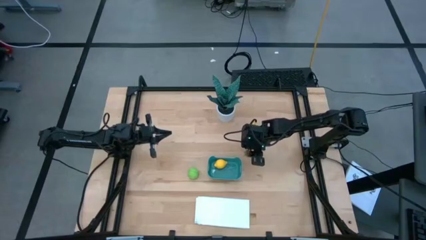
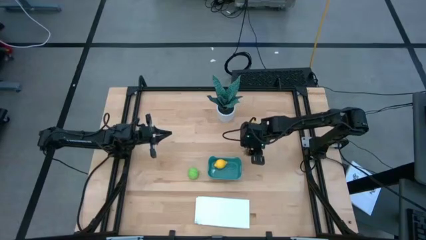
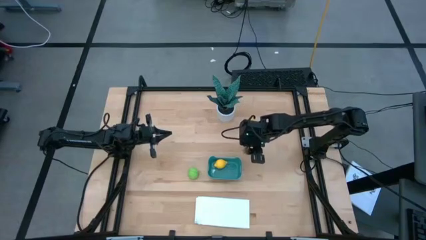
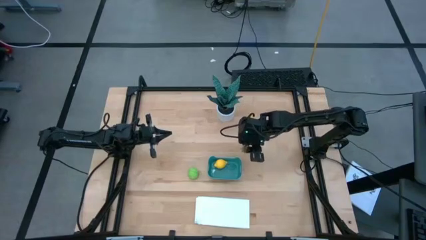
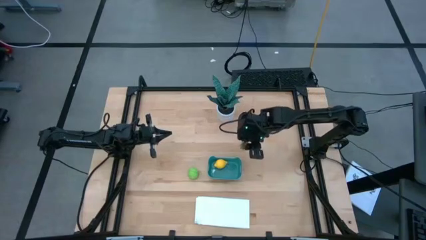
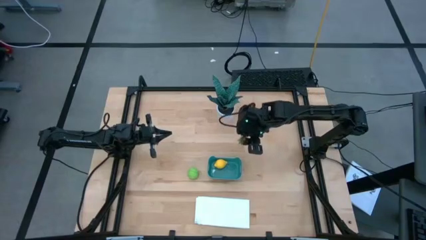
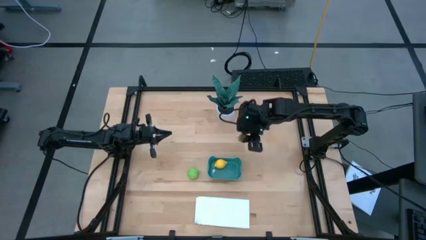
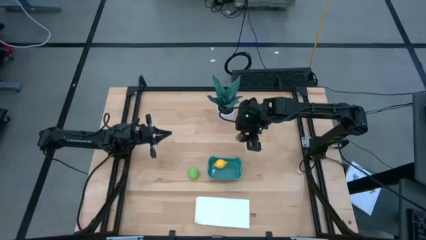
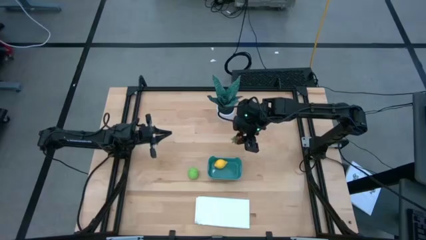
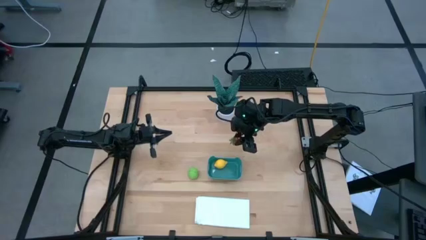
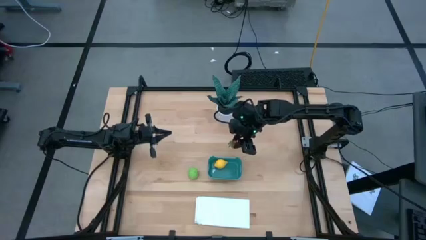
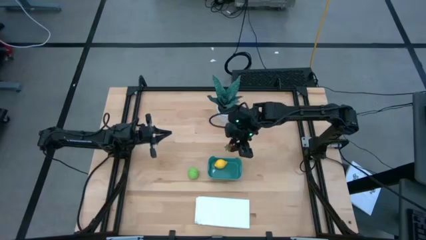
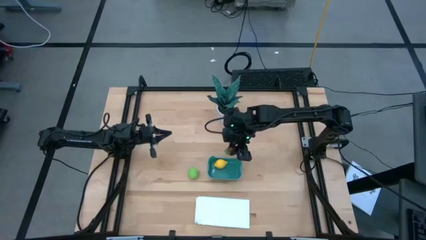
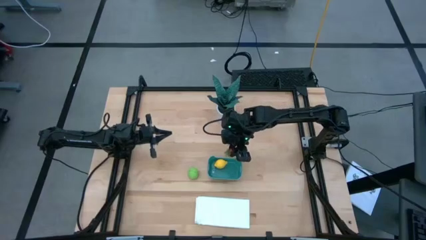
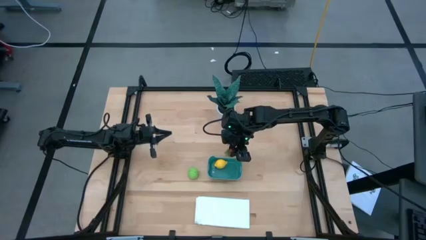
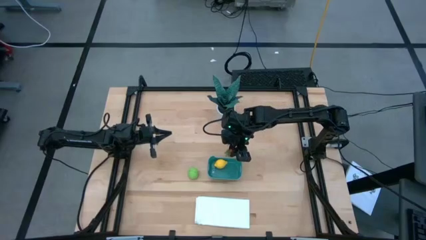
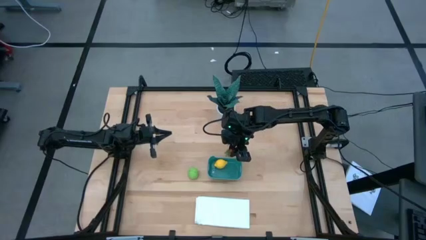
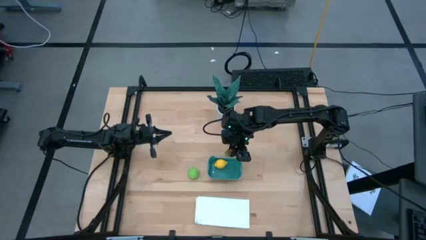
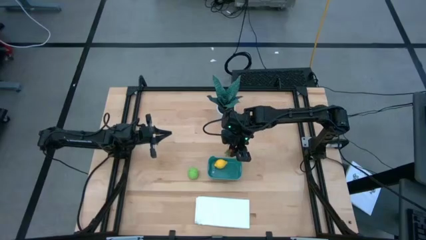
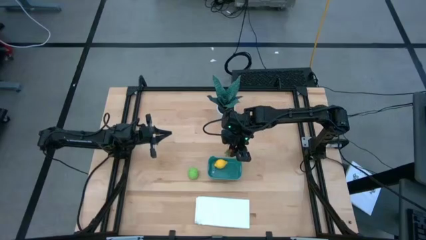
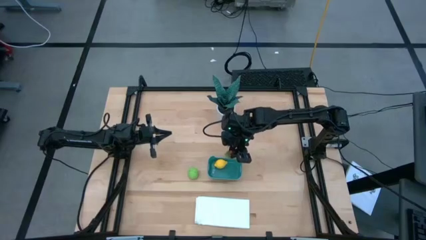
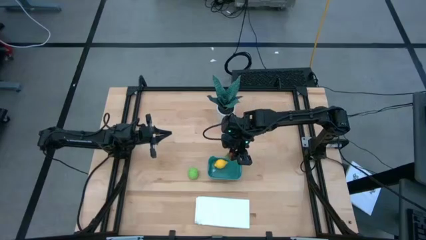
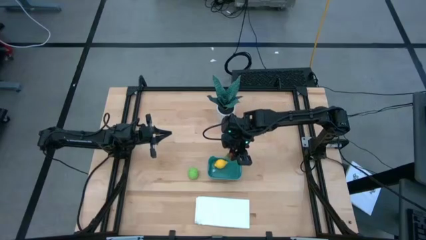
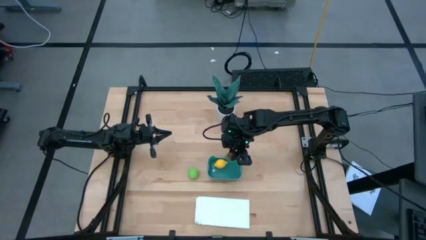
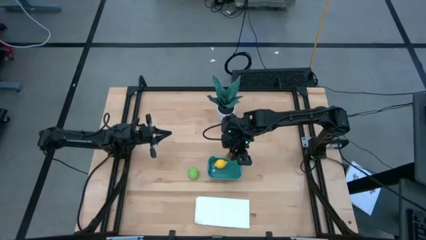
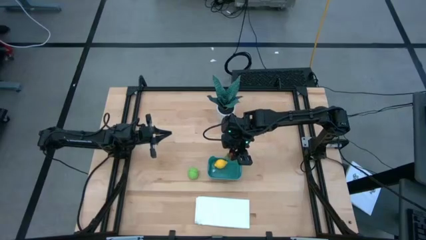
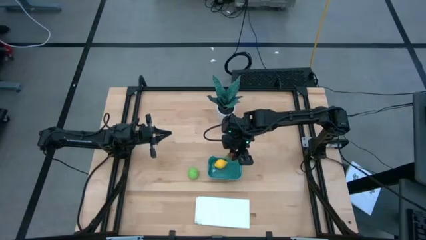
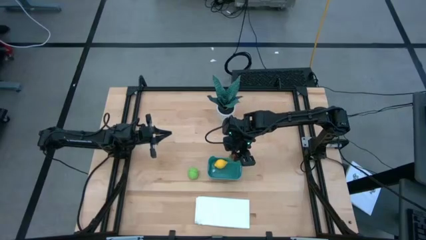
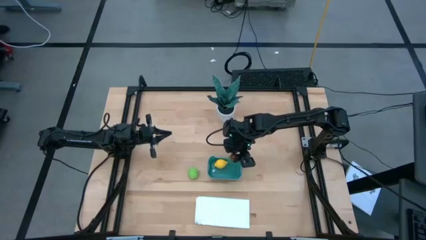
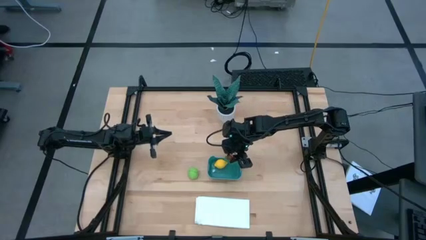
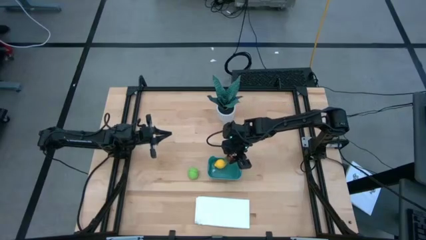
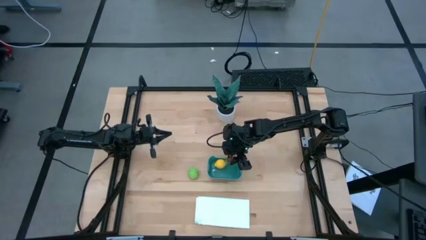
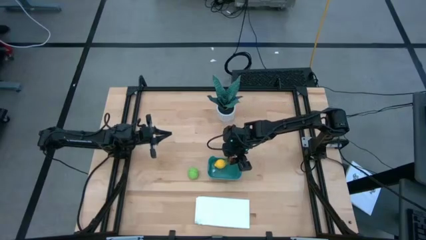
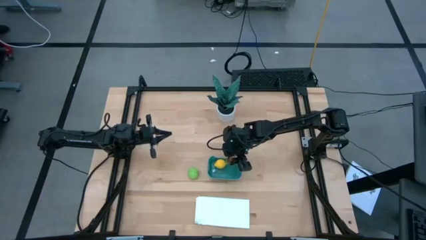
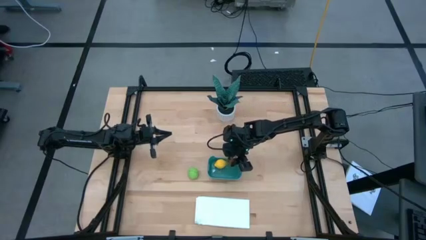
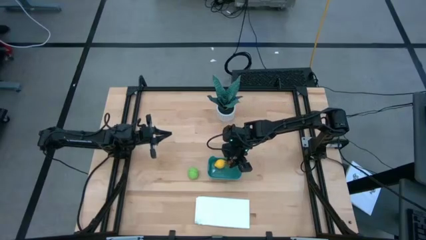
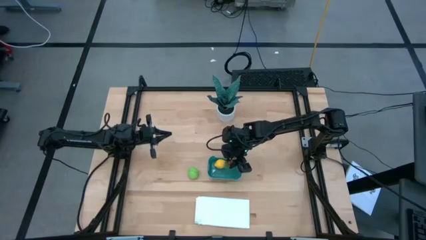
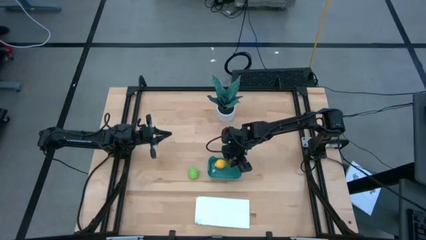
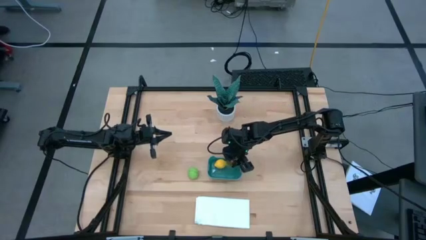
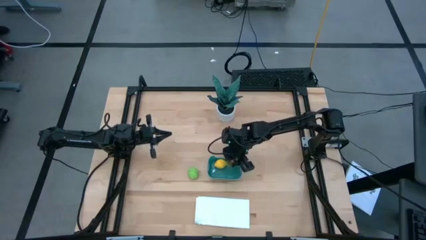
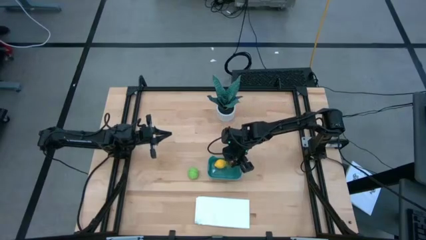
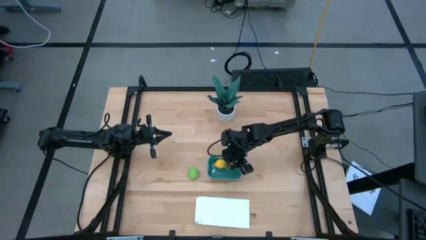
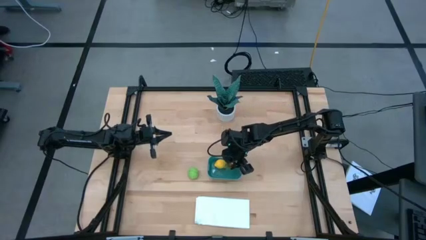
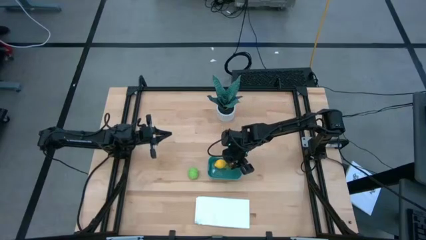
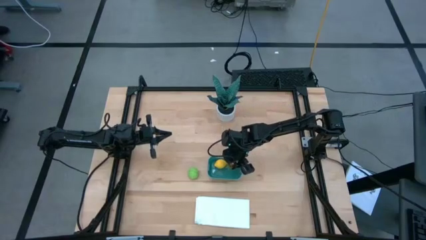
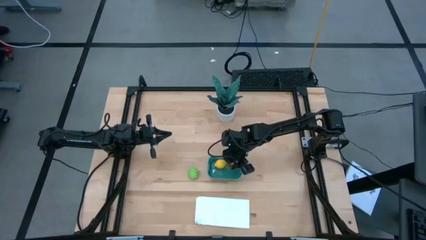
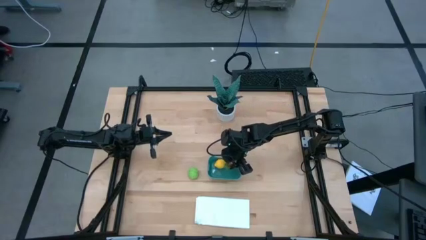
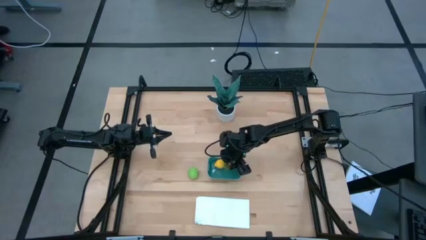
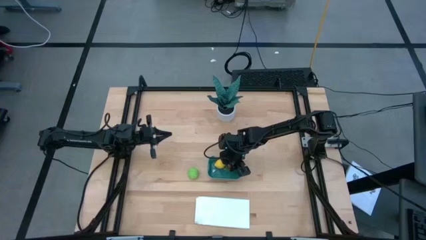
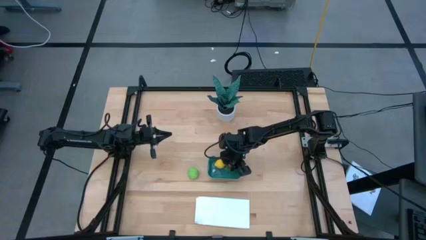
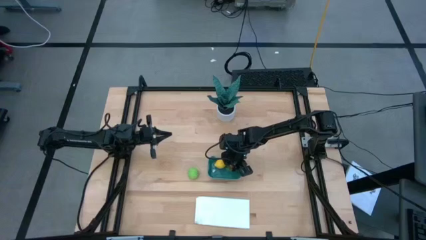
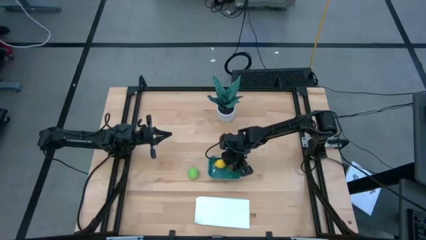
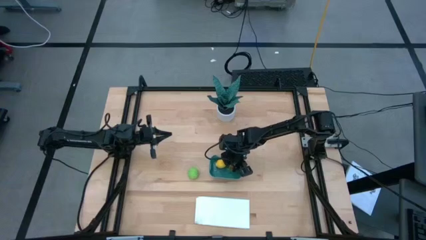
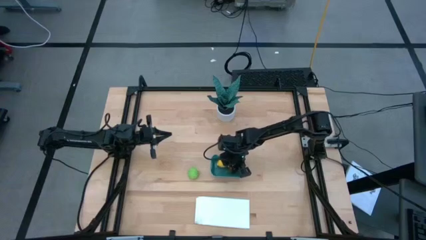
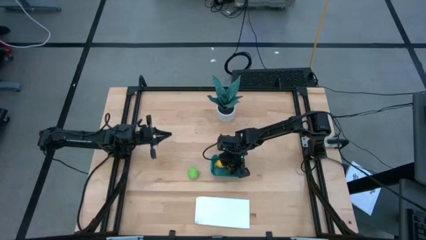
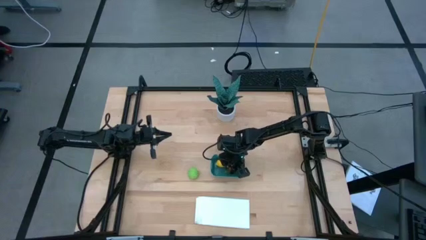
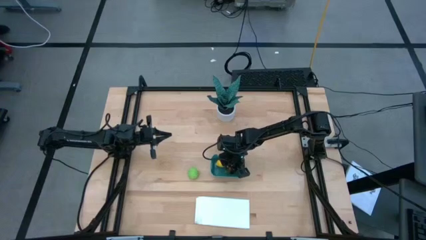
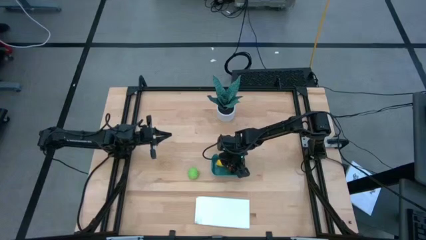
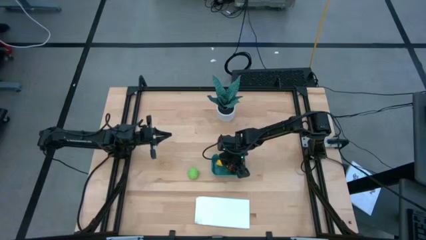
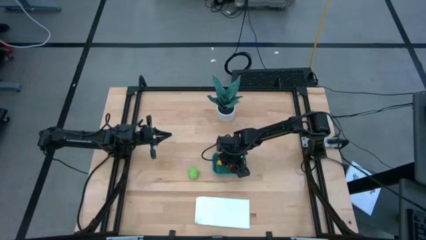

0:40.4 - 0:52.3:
Task: Pick and placing Produce into tupperware
Put the red strawberry into the green bin

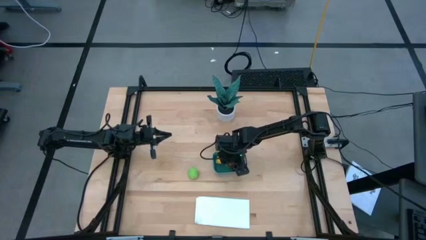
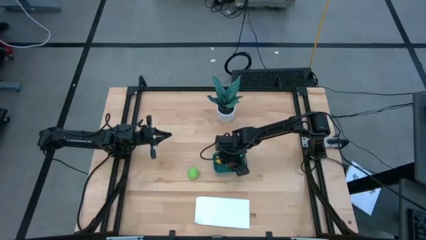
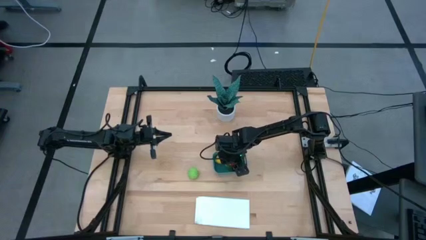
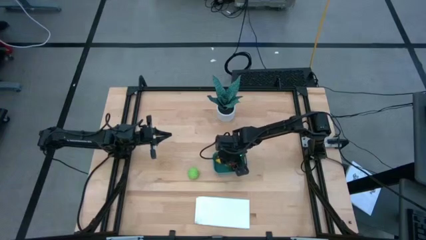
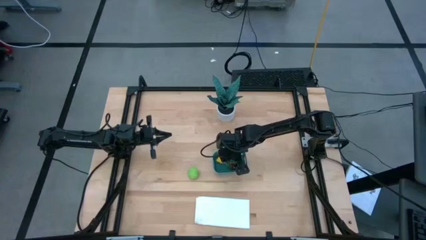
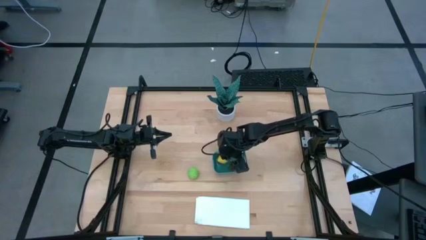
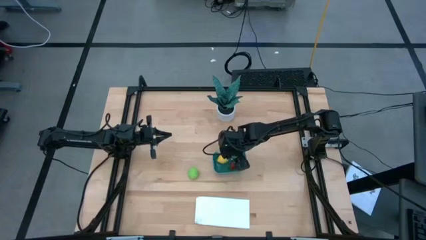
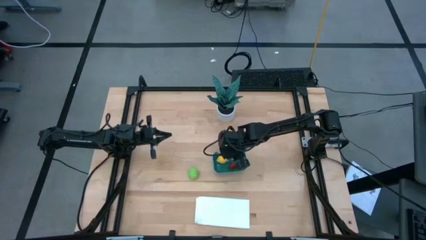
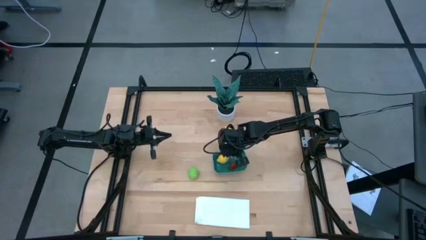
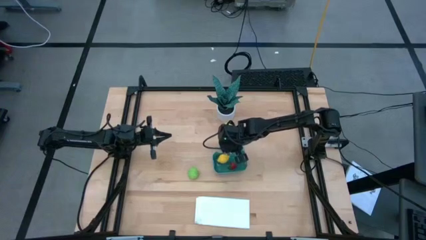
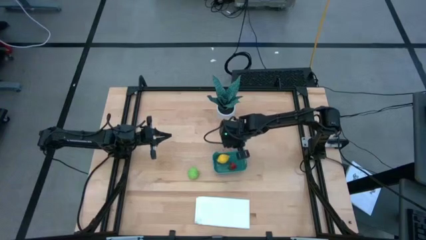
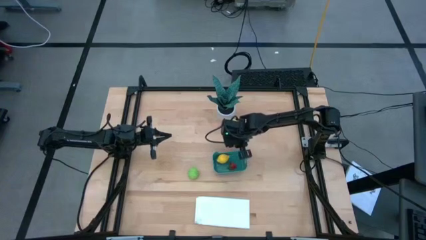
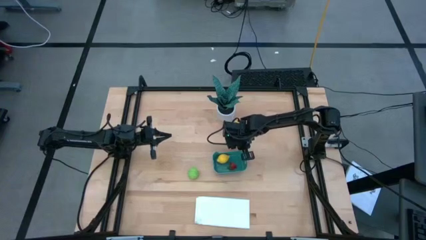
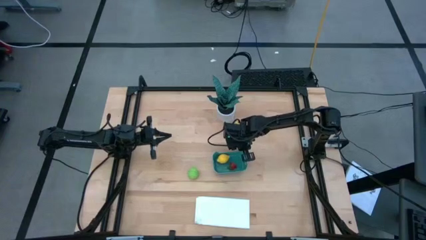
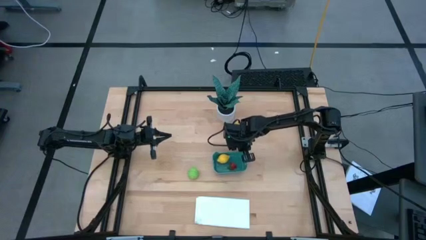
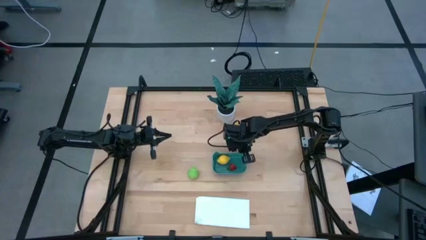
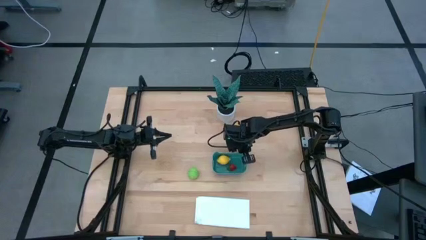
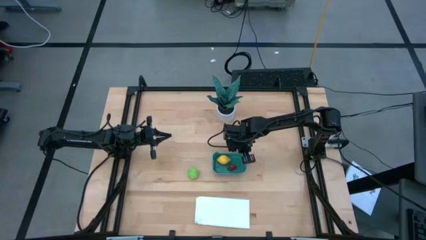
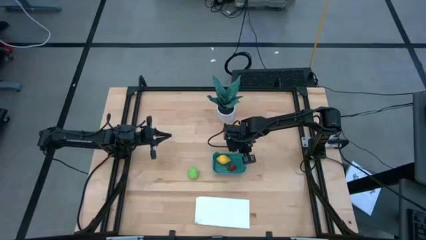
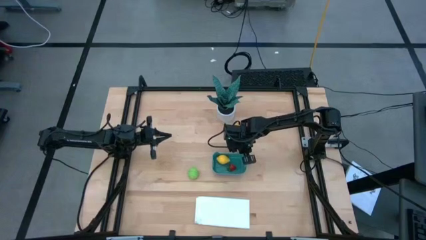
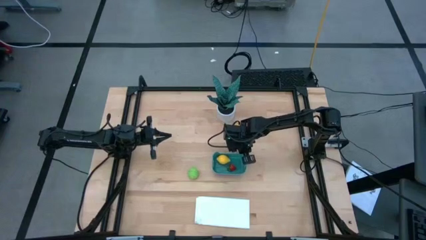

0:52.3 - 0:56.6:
Adjust the green bin
